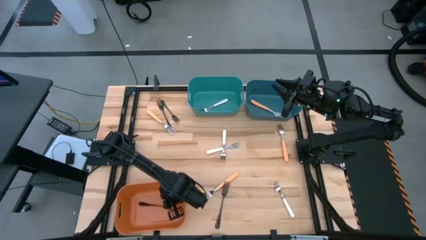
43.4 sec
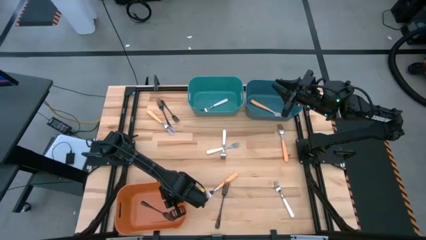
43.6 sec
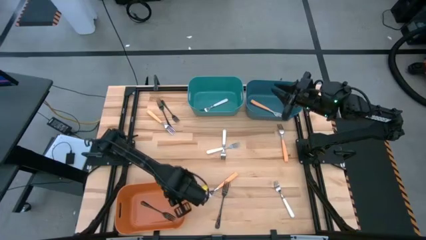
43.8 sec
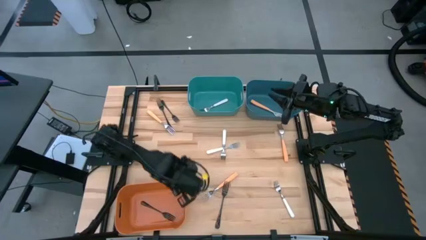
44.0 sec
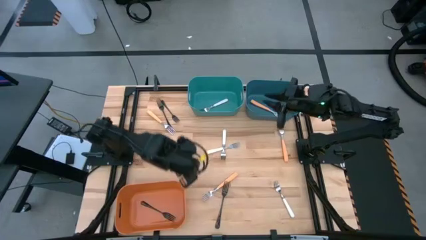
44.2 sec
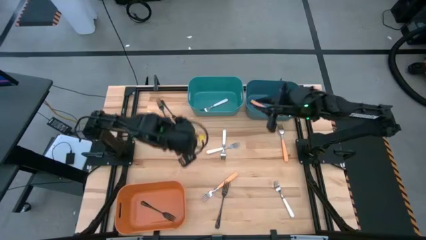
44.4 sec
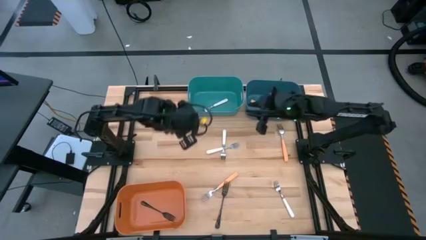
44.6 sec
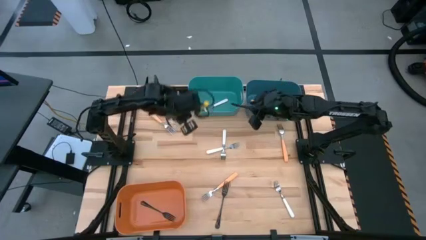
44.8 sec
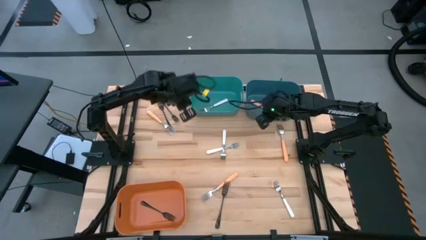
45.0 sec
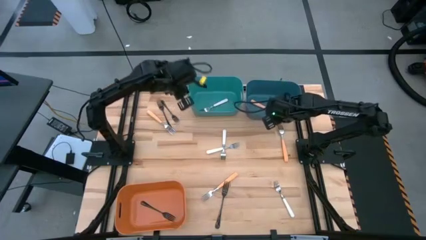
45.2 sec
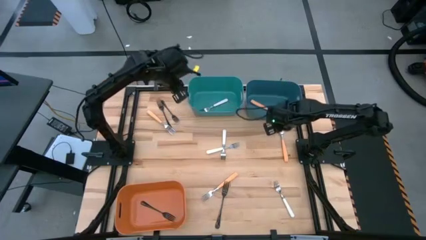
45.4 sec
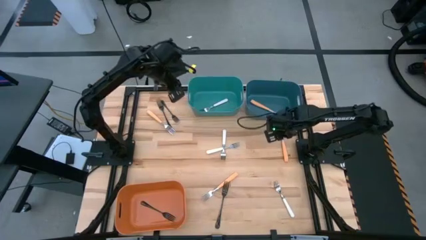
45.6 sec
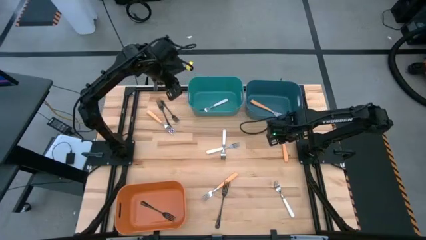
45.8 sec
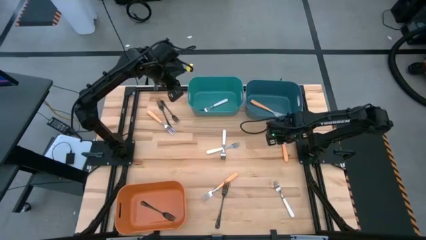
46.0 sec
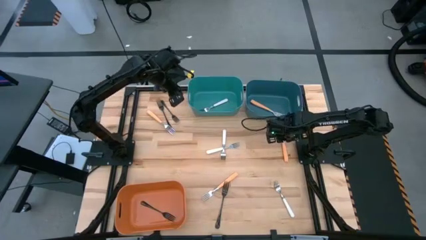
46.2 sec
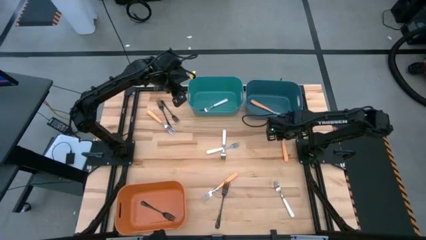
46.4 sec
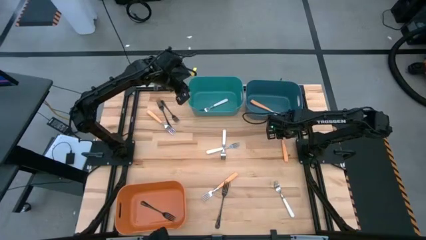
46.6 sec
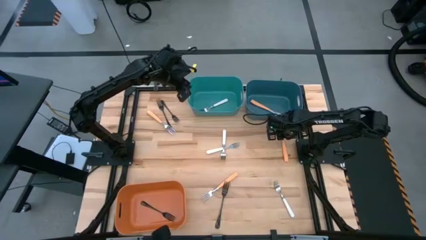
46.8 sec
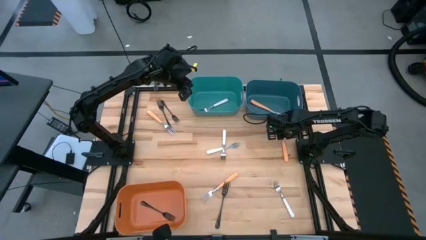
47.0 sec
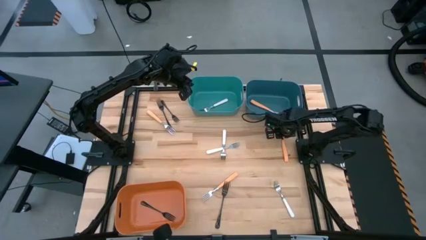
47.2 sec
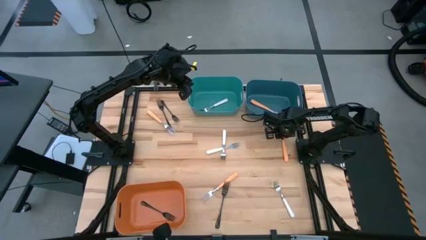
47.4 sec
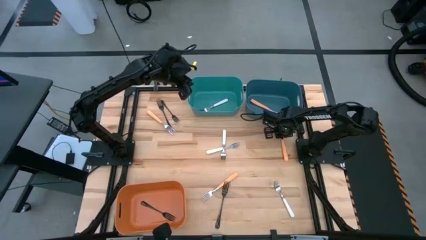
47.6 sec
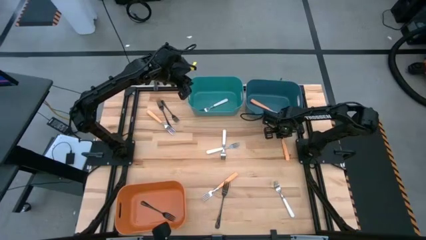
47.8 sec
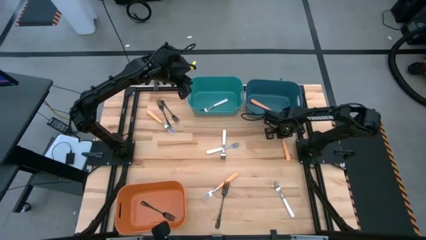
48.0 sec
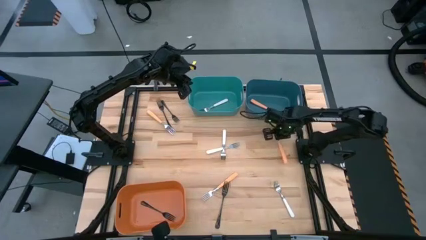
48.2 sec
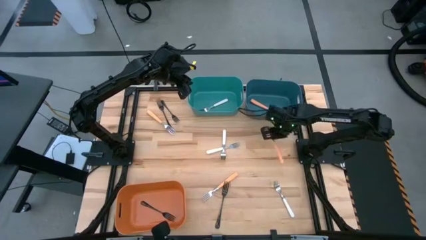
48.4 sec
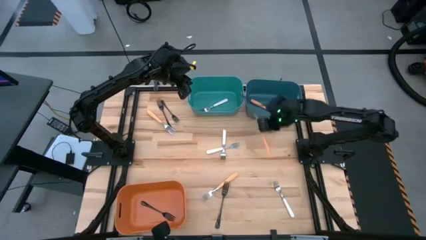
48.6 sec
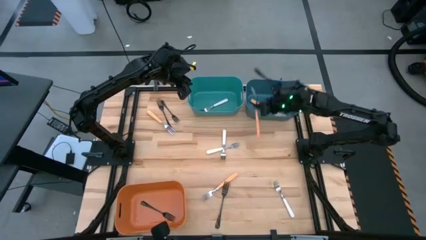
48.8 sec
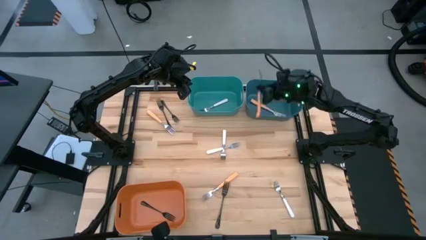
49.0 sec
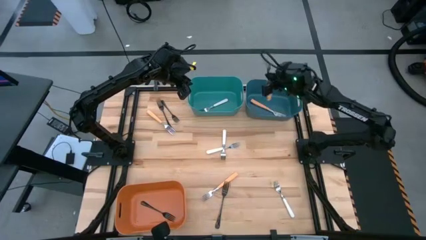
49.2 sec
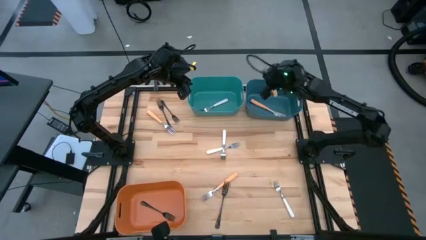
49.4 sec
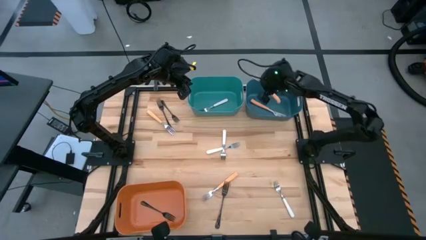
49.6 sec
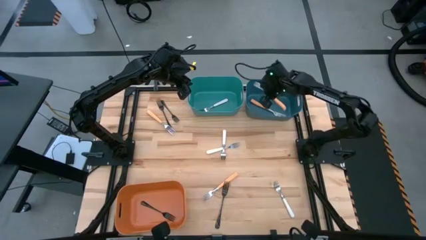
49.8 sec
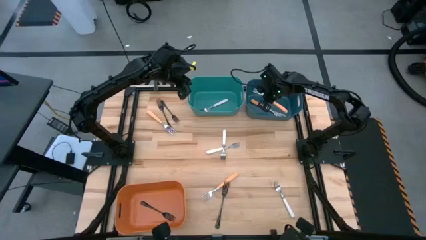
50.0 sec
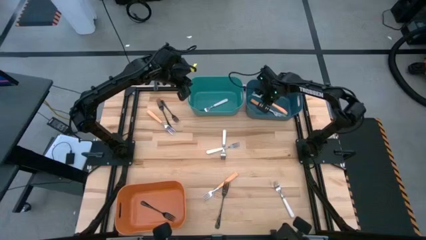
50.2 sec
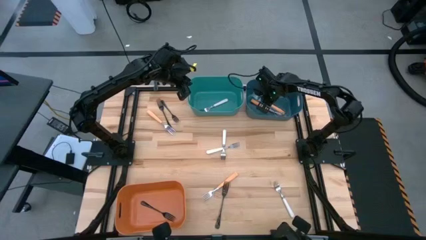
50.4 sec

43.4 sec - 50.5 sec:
Task: Sort silverware by color (type)
Put the orange fork into the blue bin

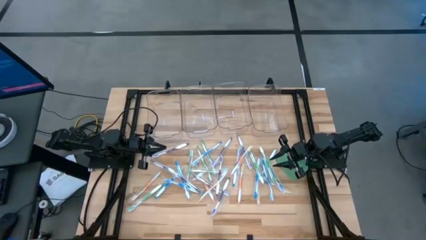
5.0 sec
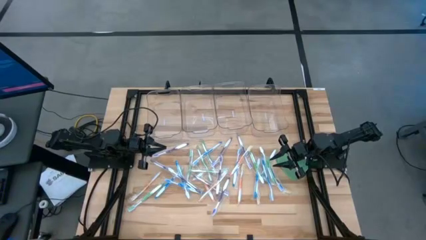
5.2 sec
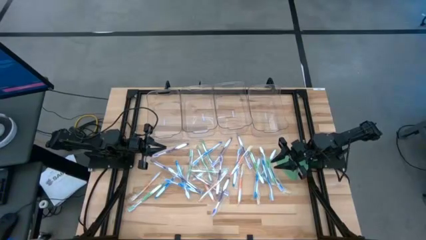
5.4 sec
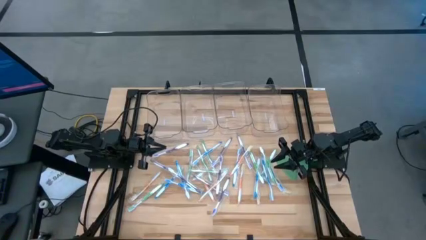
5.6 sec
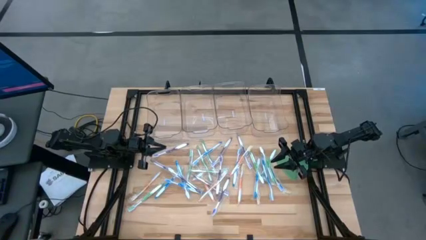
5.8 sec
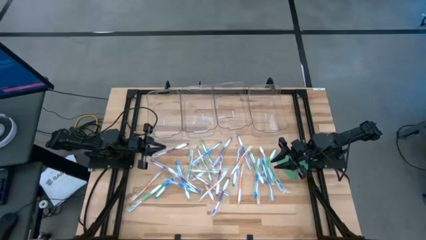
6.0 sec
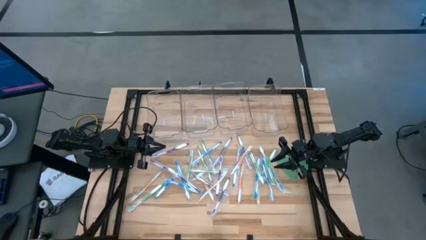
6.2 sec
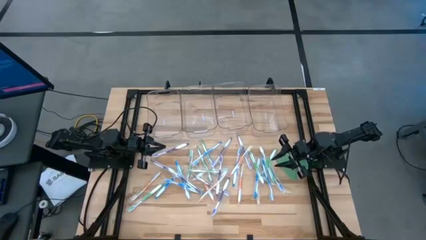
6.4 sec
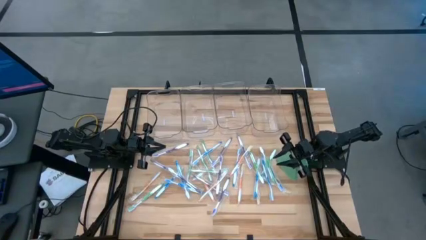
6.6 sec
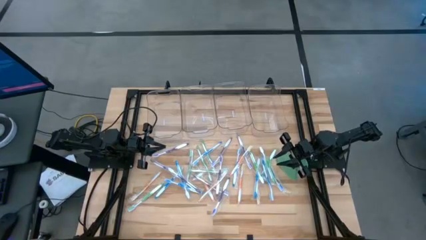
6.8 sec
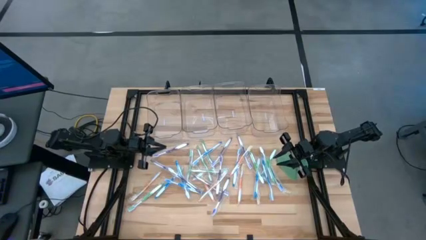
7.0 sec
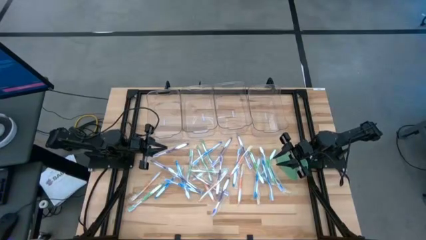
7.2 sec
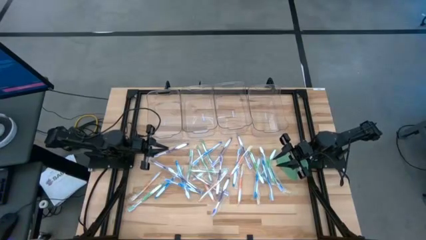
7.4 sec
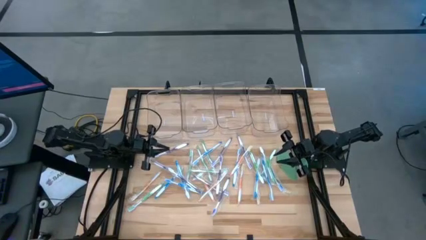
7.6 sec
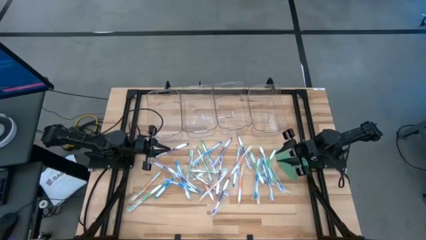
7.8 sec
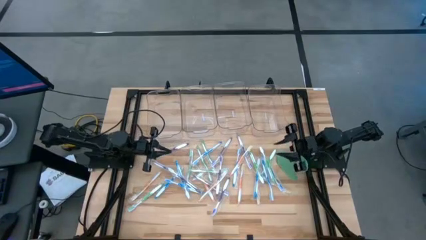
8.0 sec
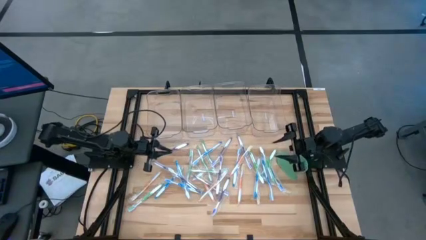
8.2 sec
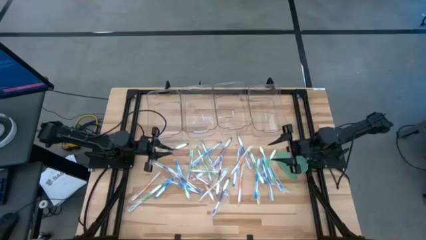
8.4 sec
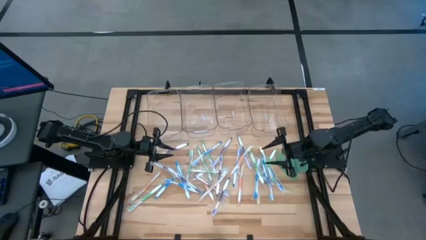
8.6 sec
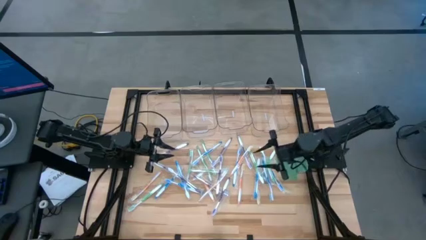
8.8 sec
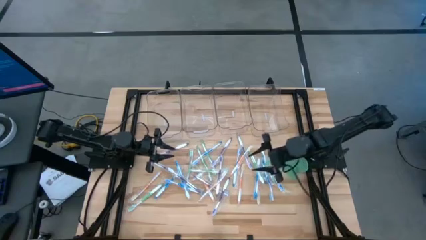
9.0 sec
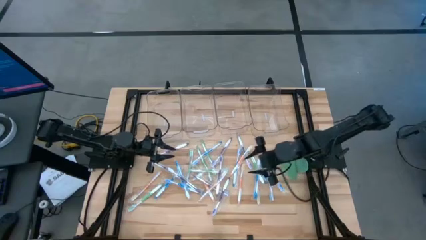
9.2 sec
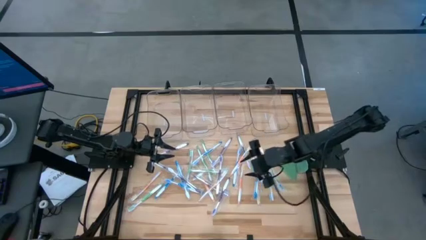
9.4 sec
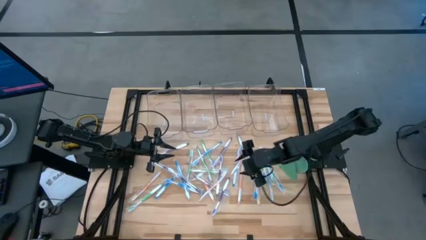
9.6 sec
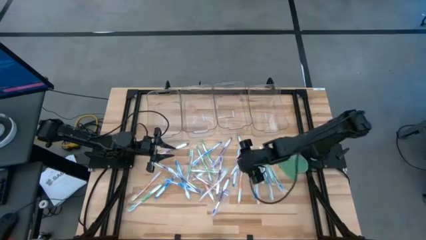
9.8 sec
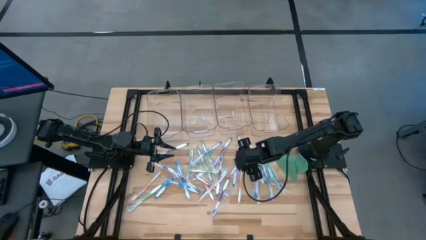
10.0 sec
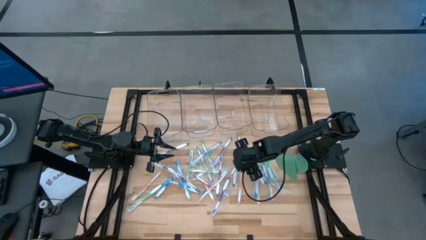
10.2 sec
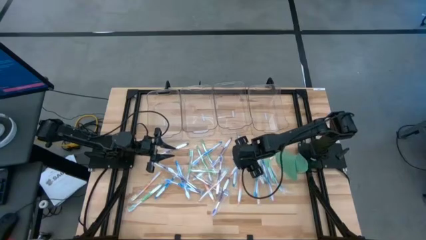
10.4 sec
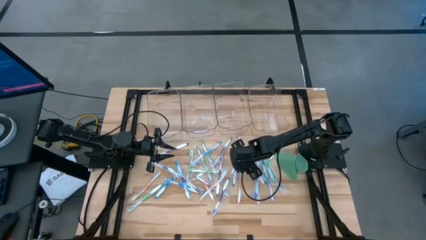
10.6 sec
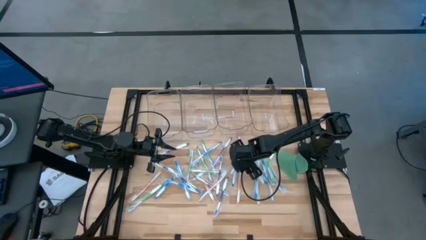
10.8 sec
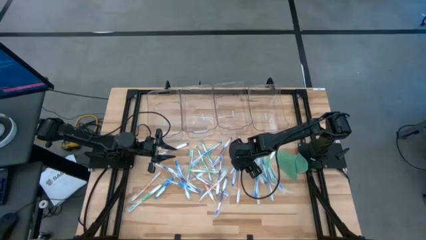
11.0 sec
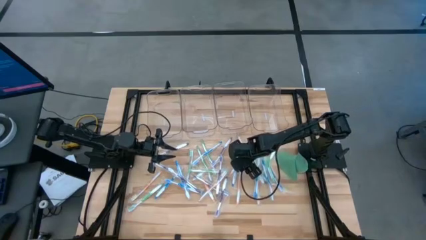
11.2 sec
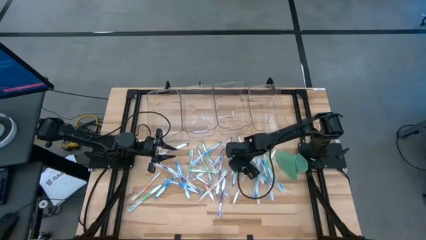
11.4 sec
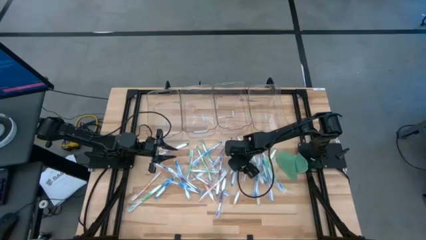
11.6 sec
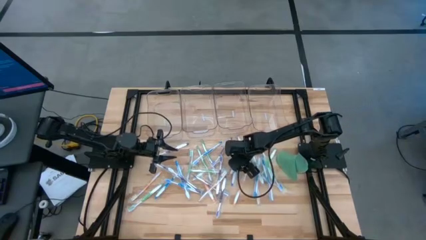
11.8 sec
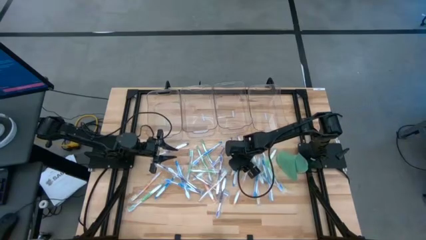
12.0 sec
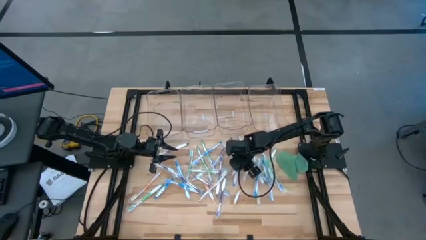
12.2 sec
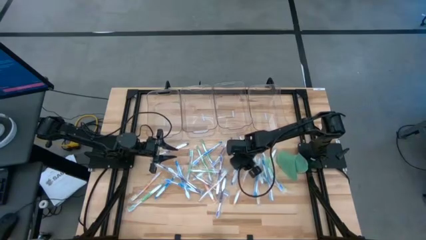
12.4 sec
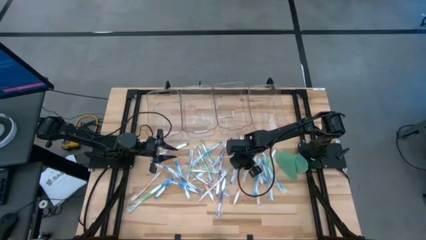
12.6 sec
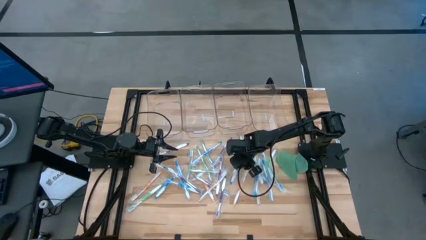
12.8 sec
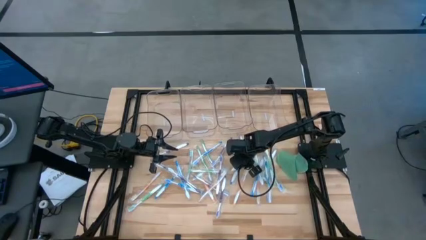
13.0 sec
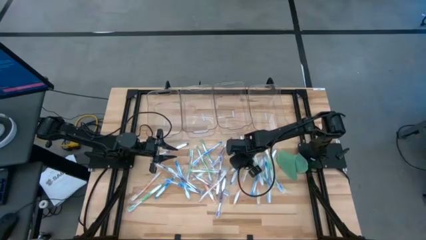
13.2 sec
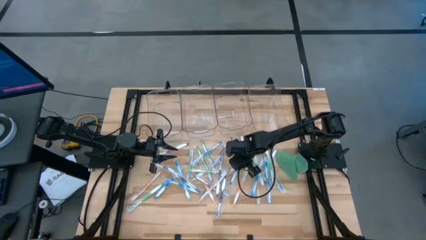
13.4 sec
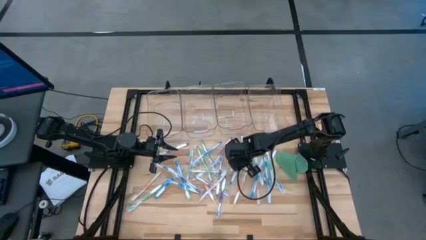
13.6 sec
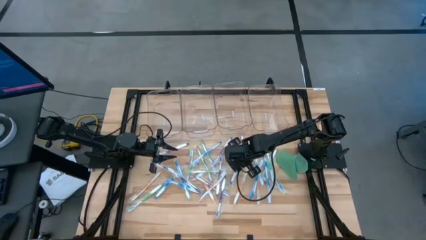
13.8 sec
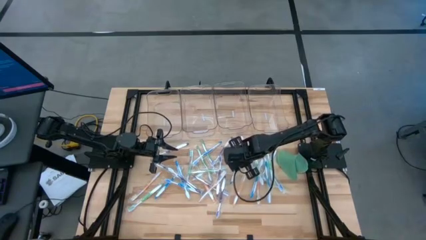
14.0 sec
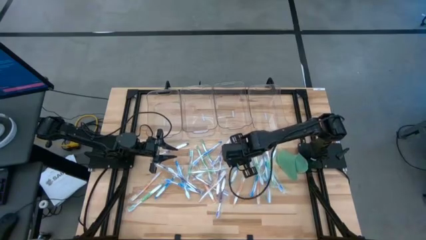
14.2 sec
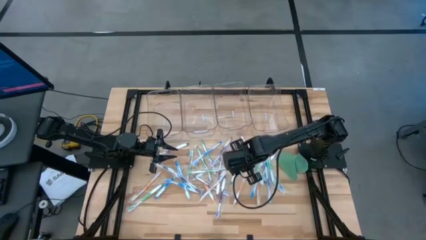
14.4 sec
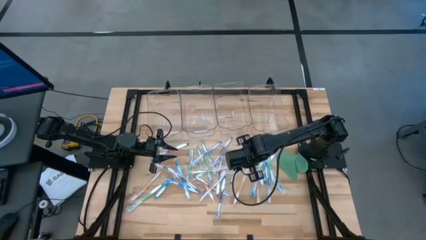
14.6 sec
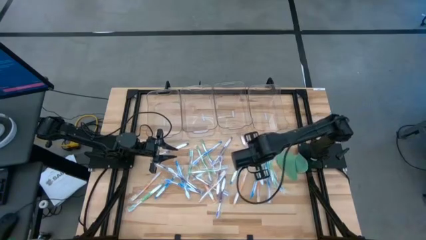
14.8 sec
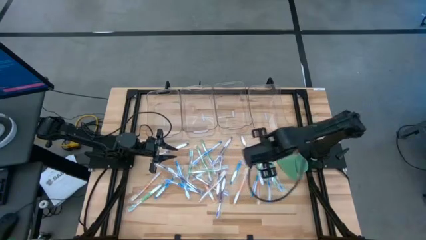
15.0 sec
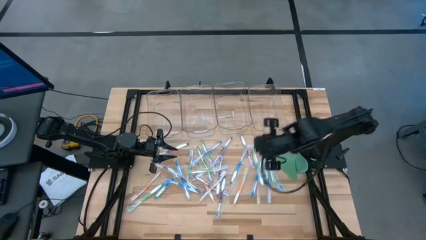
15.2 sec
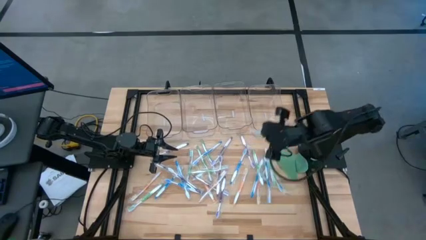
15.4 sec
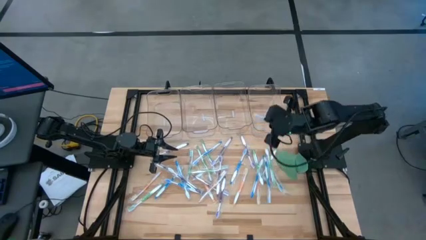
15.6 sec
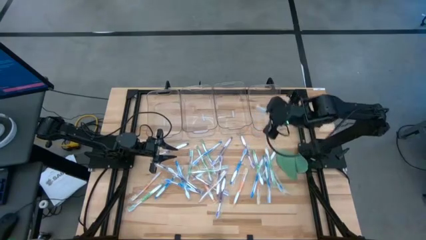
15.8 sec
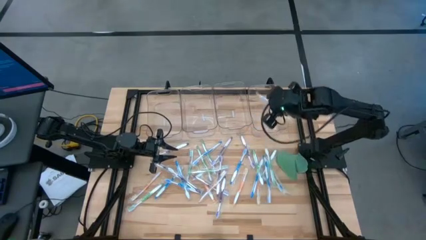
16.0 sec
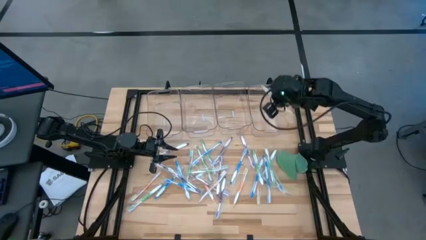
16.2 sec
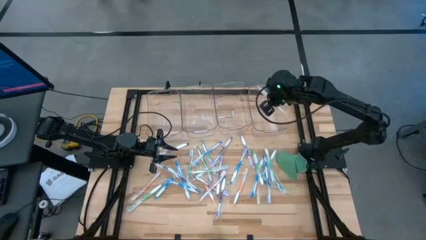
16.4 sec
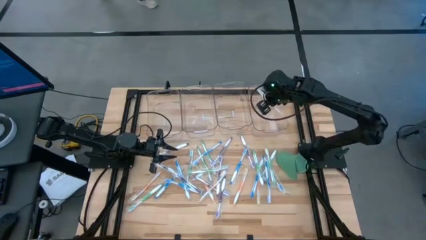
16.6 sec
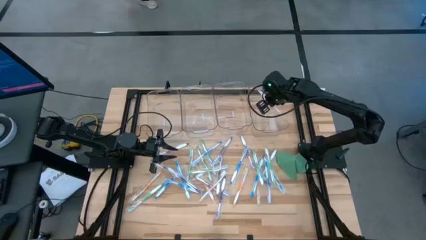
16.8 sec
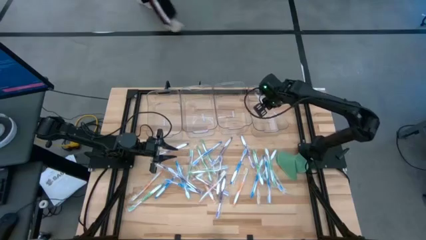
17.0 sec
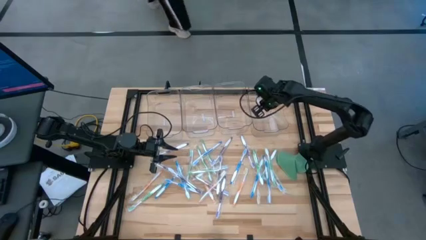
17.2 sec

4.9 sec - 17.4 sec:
Task: Pick & Place Toothbrushes
Put the orange toothbrush into the right transparent bin
